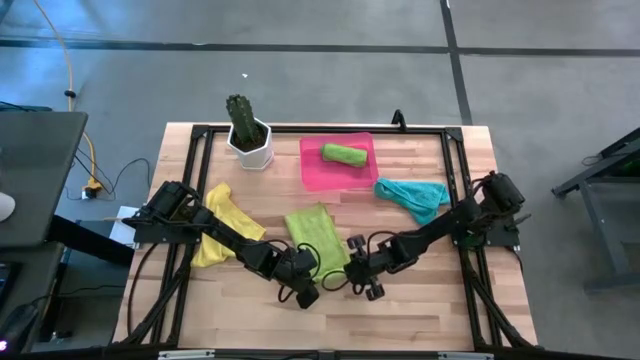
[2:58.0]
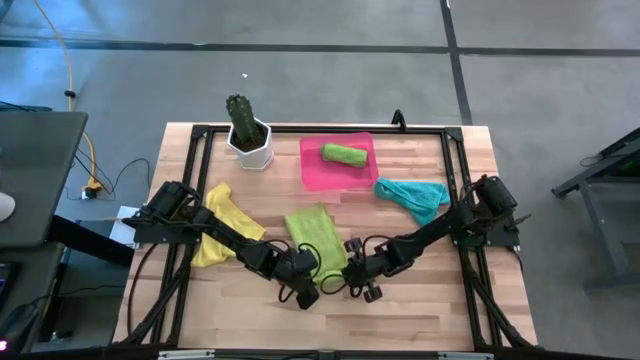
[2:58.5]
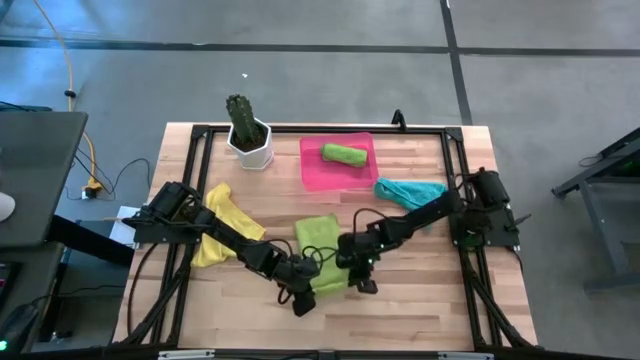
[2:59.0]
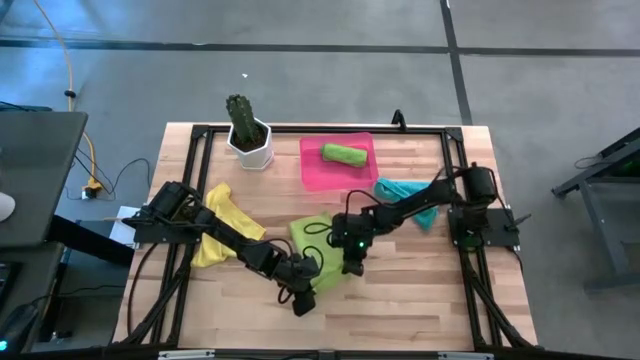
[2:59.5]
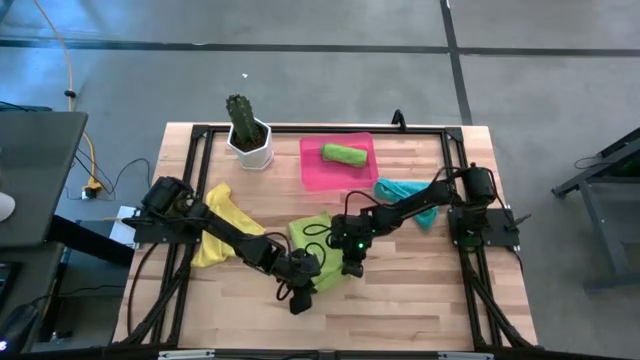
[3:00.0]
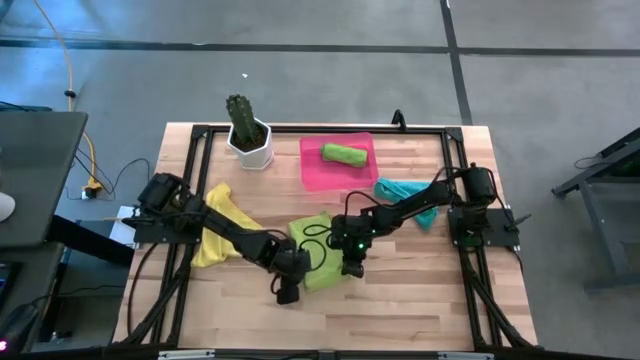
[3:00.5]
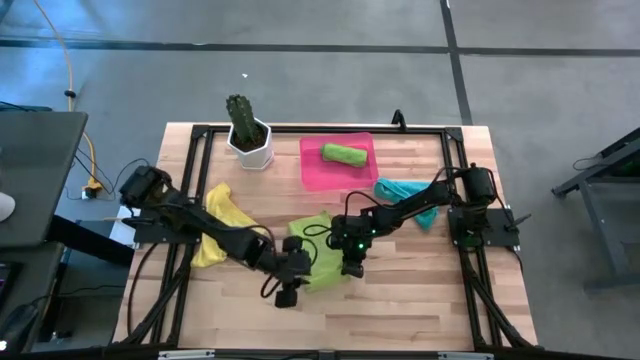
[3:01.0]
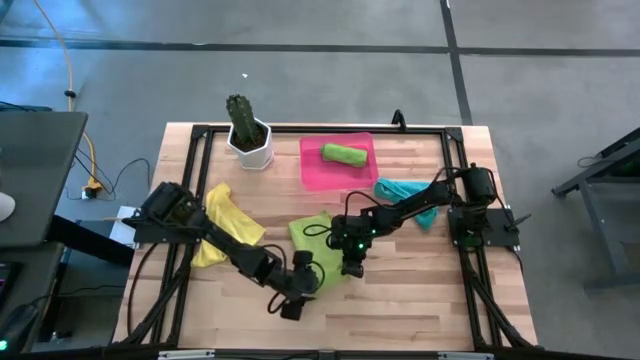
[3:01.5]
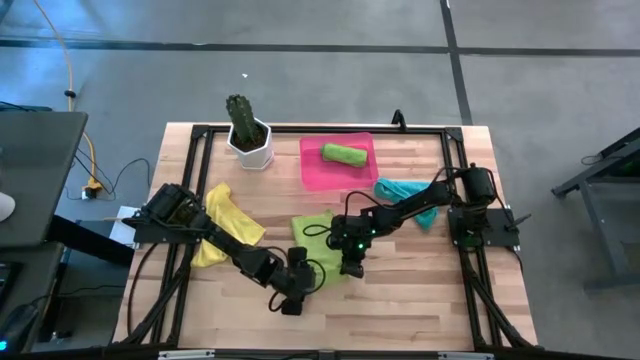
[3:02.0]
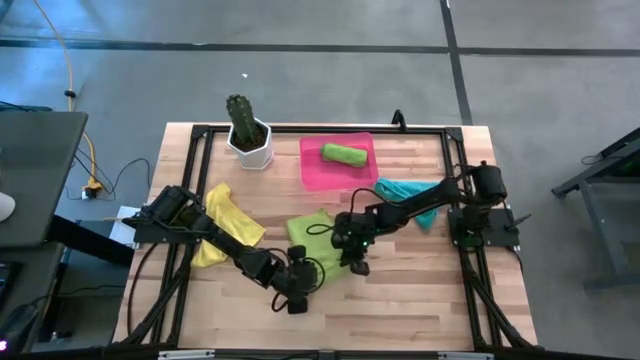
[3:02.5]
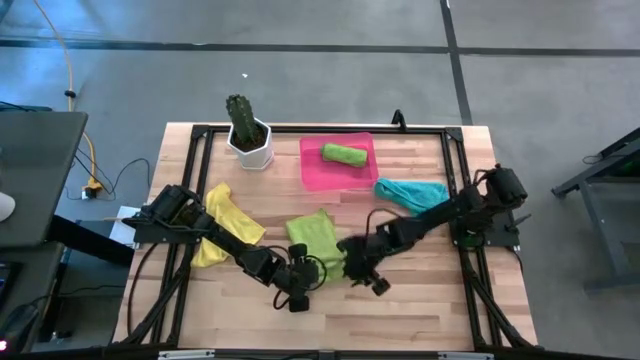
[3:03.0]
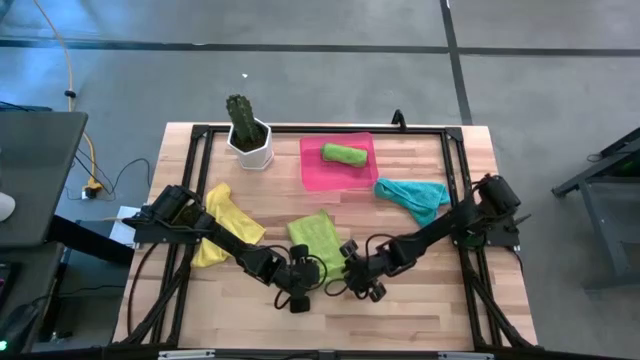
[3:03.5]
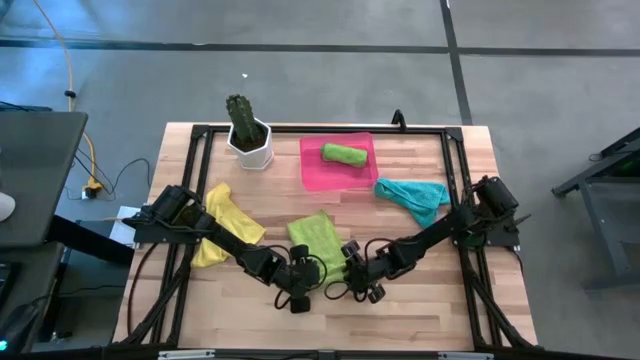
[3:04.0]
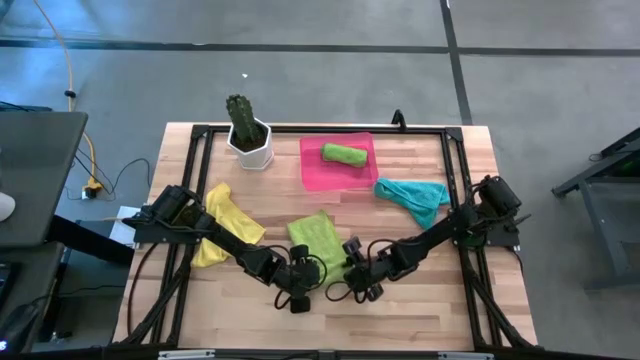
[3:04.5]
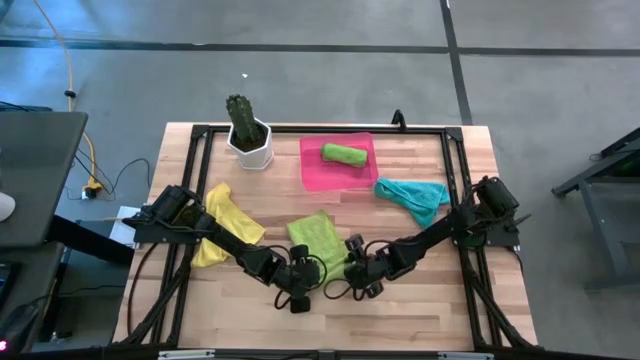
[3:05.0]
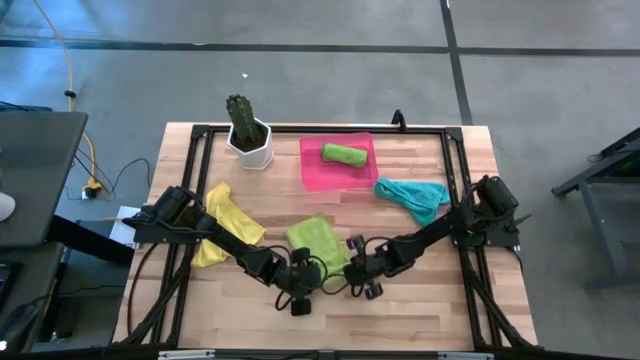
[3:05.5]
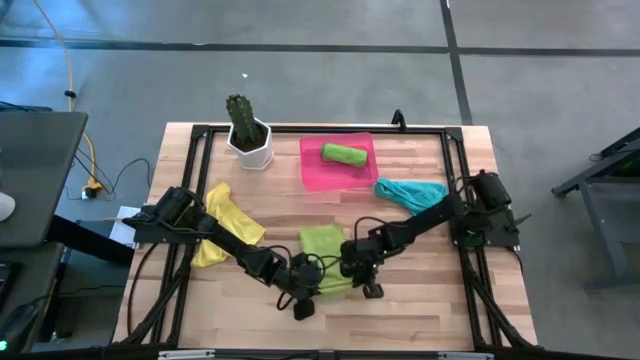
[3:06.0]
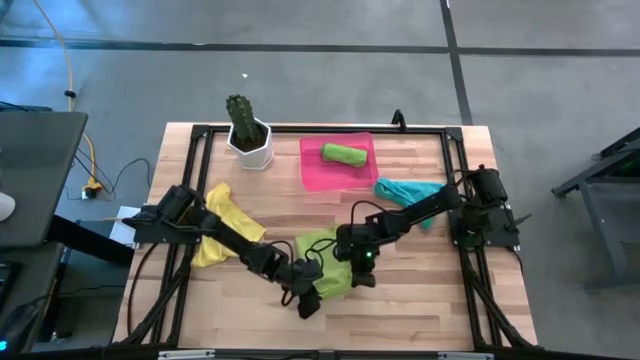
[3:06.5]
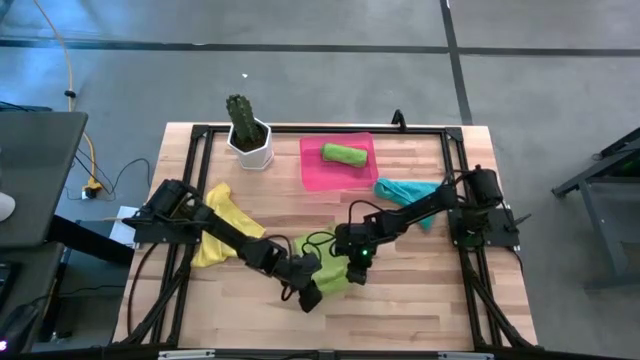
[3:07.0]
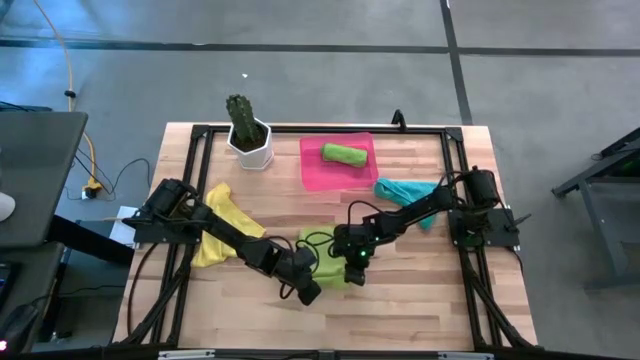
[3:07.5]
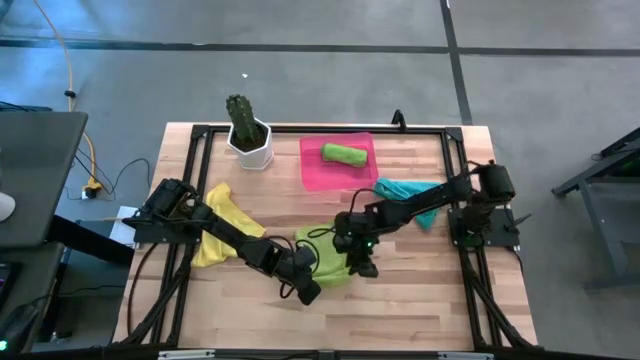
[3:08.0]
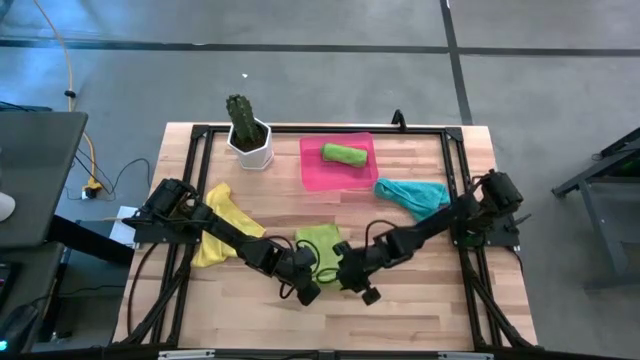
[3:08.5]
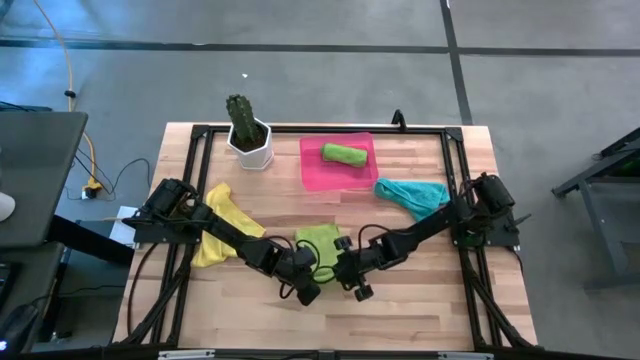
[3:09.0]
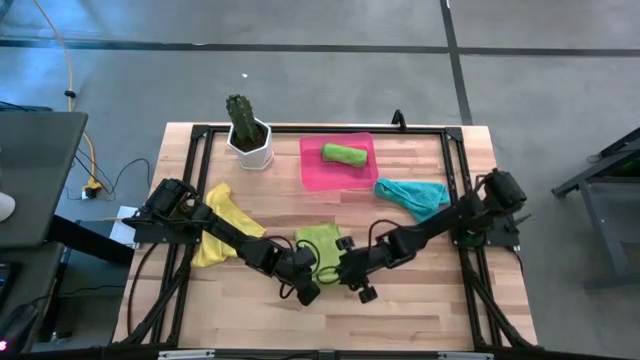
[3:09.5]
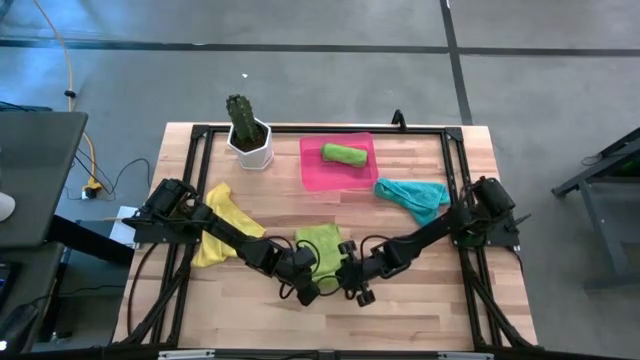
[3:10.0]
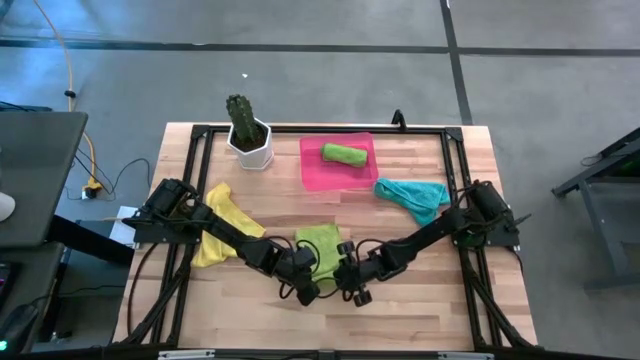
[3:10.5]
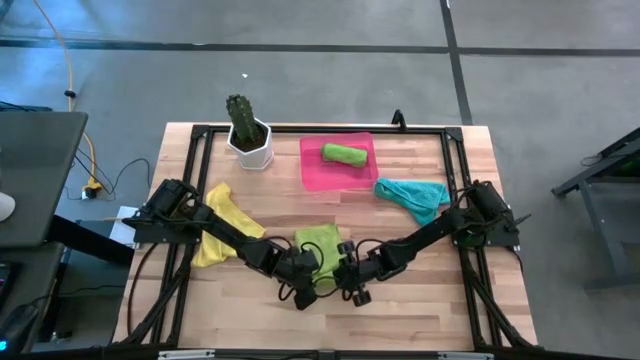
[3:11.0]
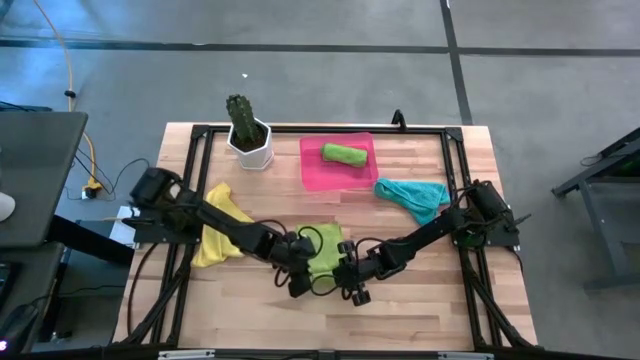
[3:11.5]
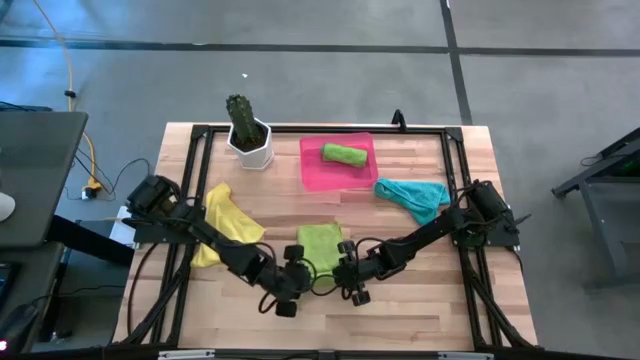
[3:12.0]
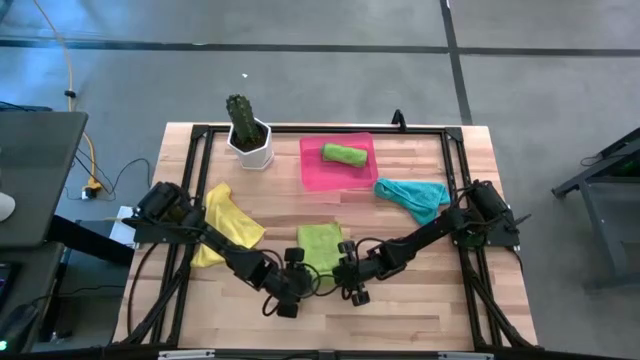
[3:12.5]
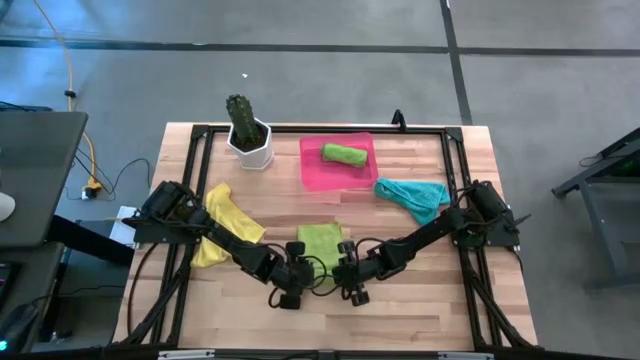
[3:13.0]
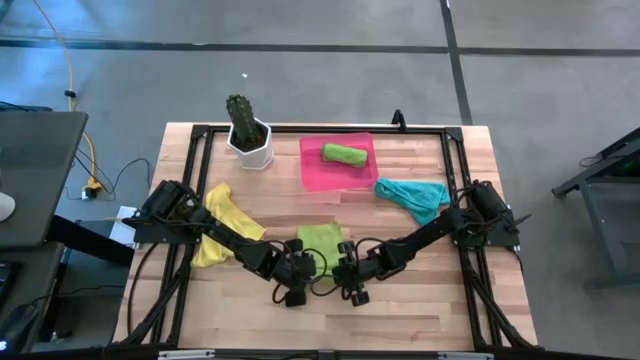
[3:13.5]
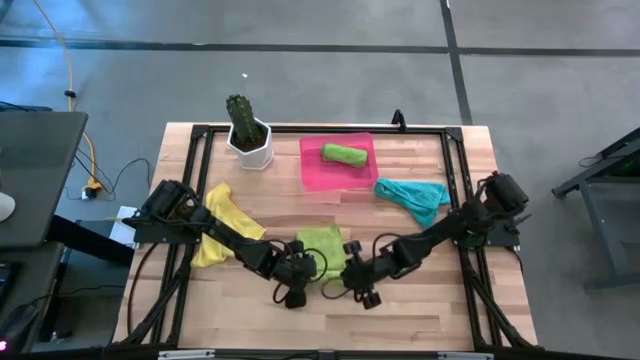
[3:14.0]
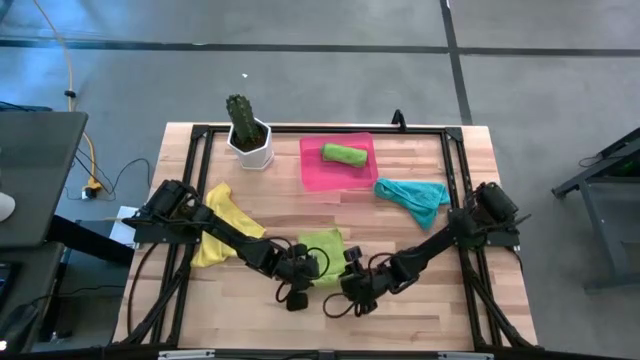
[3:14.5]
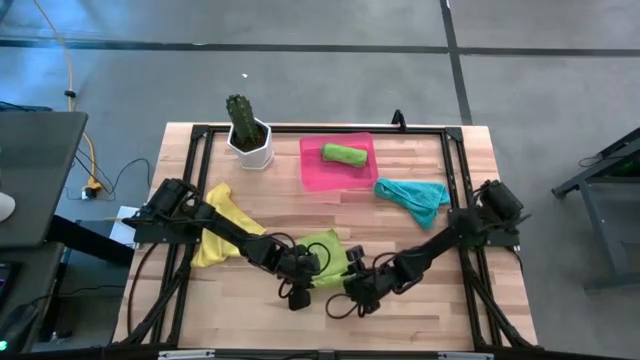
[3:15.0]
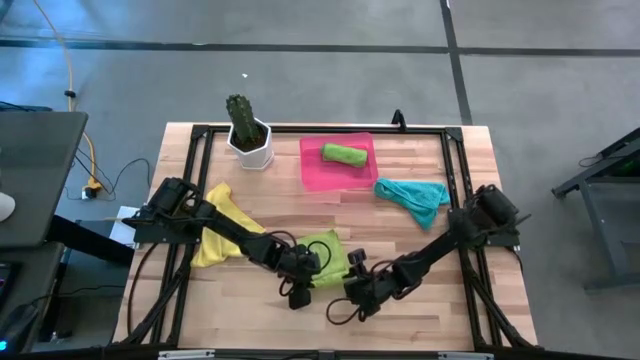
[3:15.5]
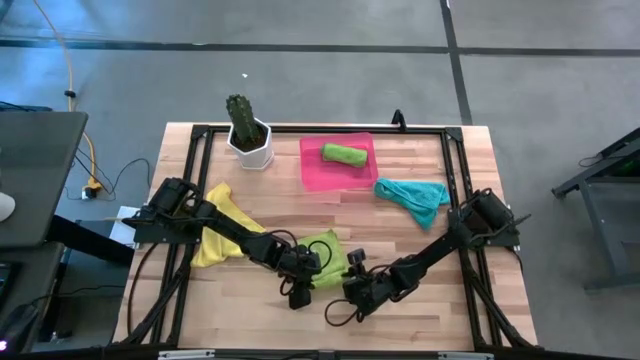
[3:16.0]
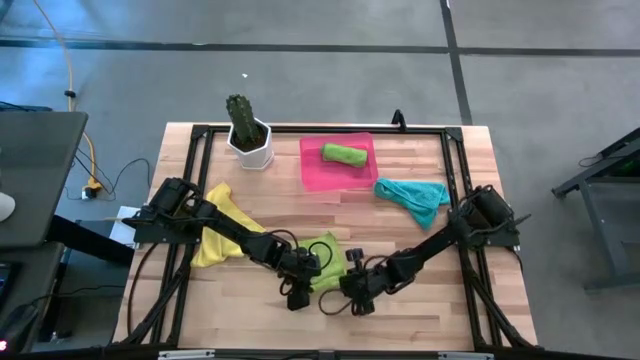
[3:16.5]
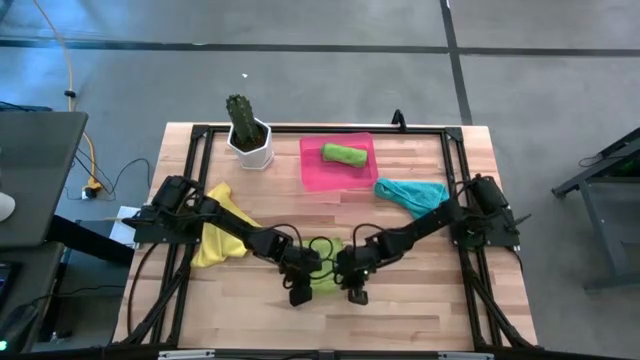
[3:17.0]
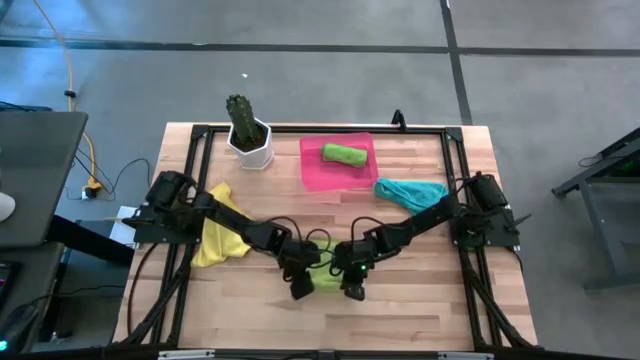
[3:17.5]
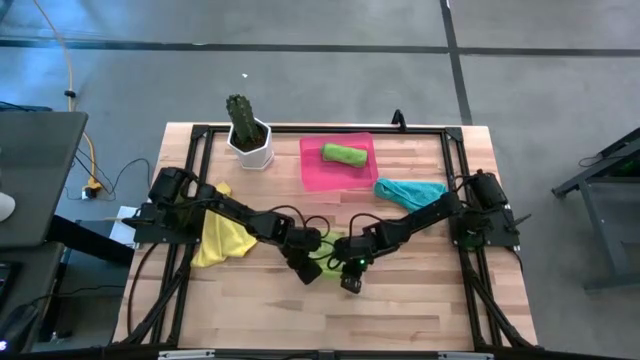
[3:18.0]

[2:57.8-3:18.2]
Task: Roll microfiber towels into tight, uniform cylinder then place into a basket
Roll the light green microfiber cloth

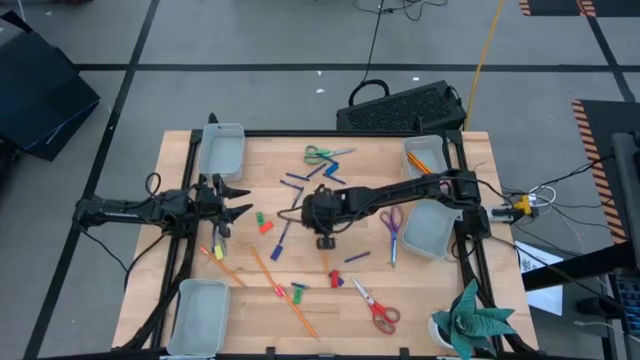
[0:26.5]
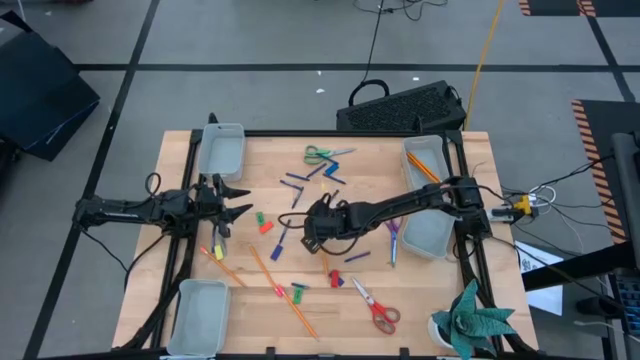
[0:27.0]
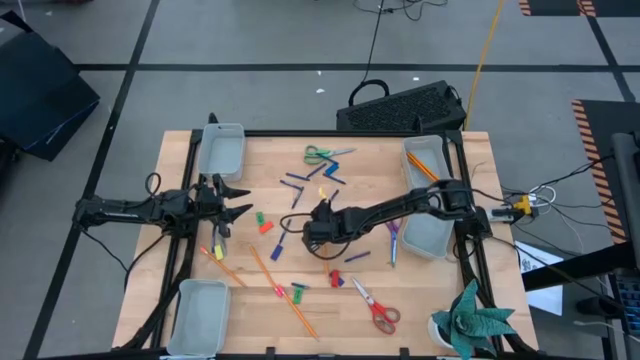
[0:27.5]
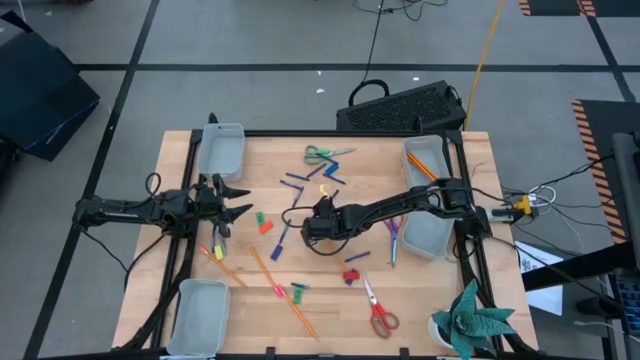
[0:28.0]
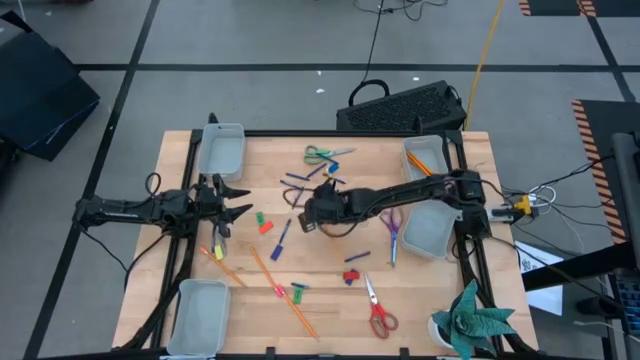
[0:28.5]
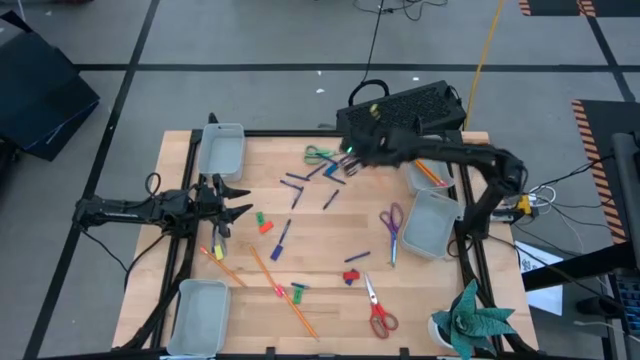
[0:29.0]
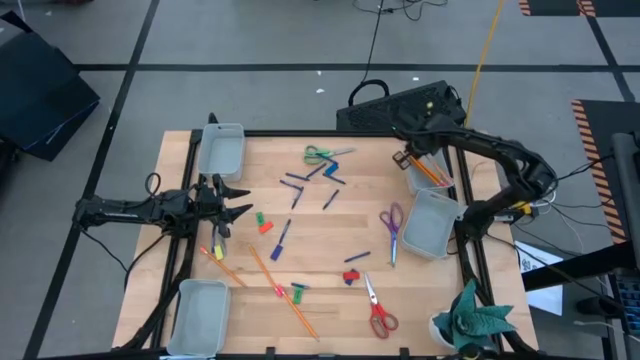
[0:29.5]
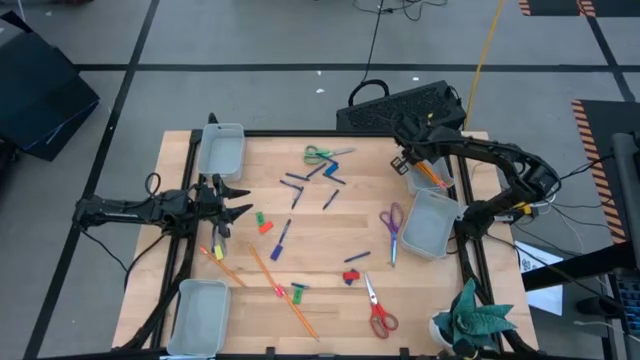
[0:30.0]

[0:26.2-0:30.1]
Task: Sort crayons/erasers/pens/pencils in bins
Put the orange pencil into the top right gray bin
